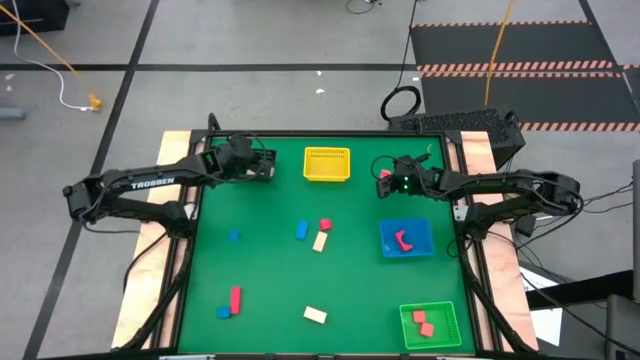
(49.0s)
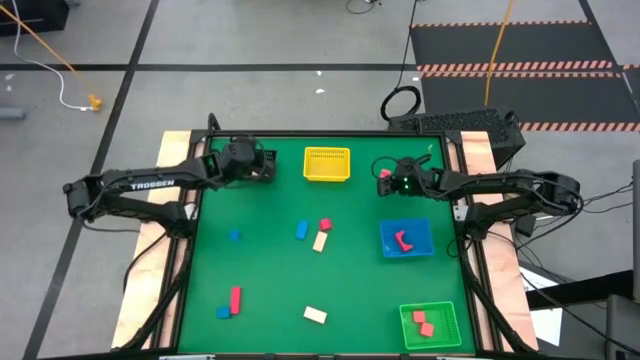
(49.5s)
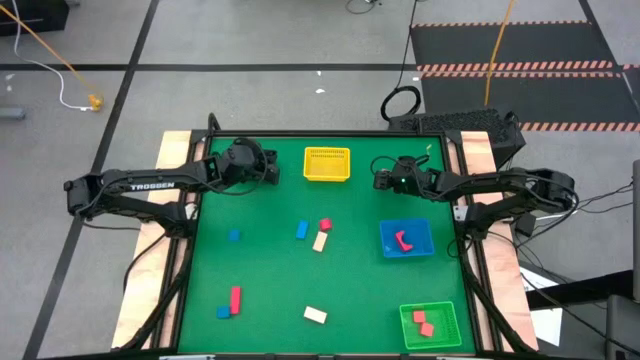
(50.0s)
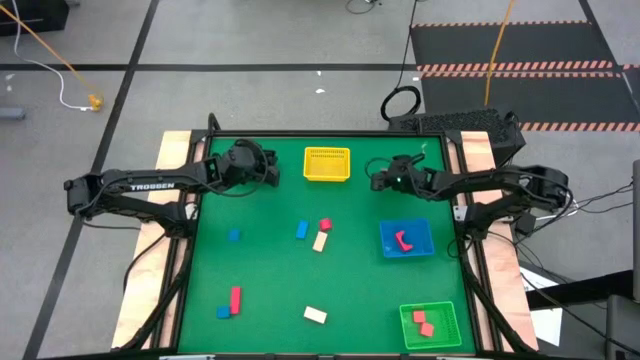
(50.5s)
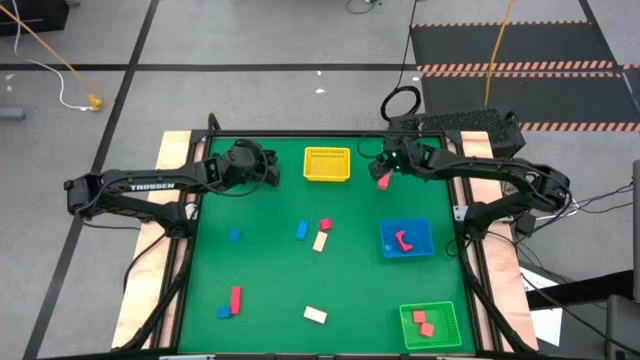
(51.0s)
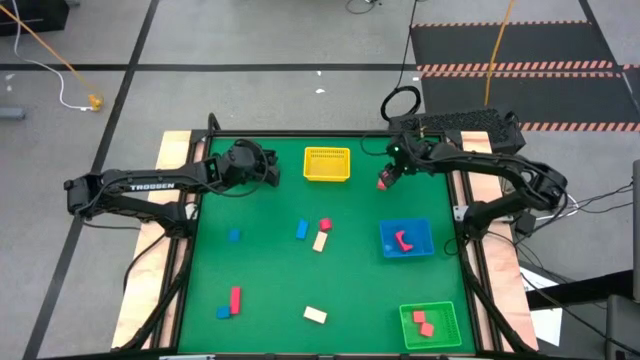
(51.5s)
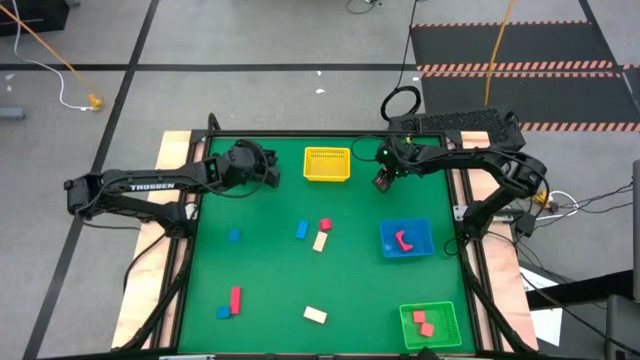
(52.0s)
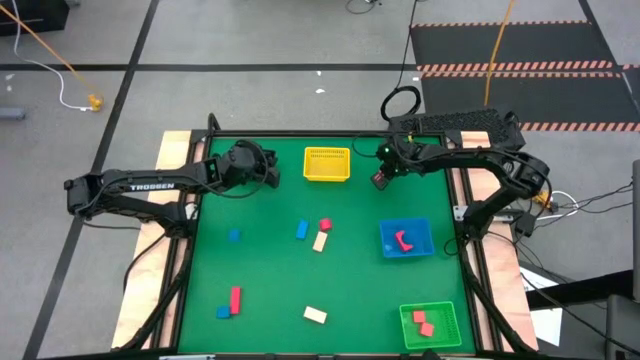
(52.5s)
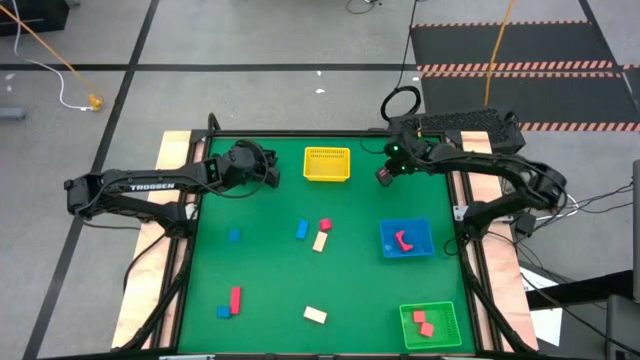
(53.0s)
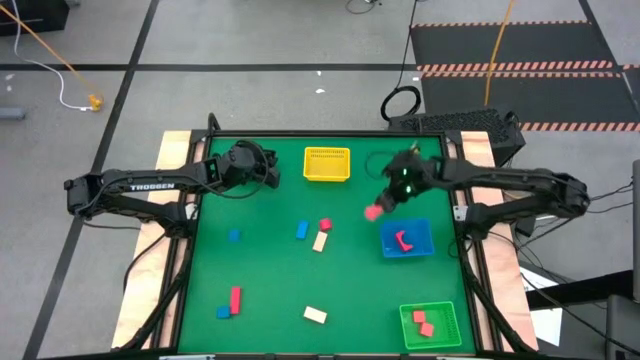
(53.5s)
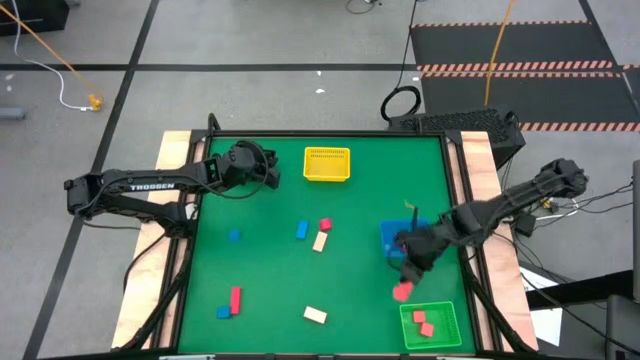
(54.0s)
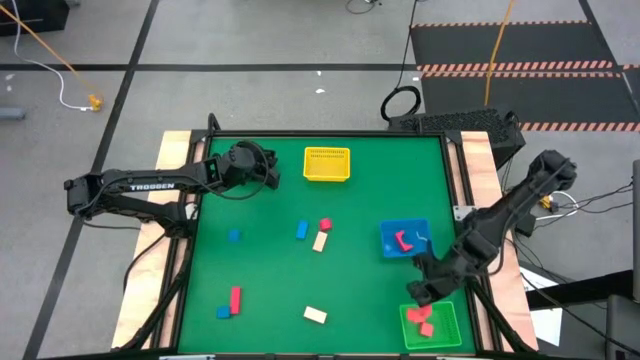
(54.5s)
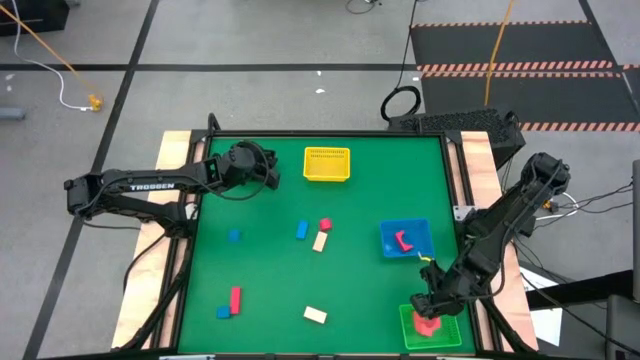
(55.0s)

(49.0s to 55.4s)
Task: Sort & place blocks by color
Put the orange block into the green bin

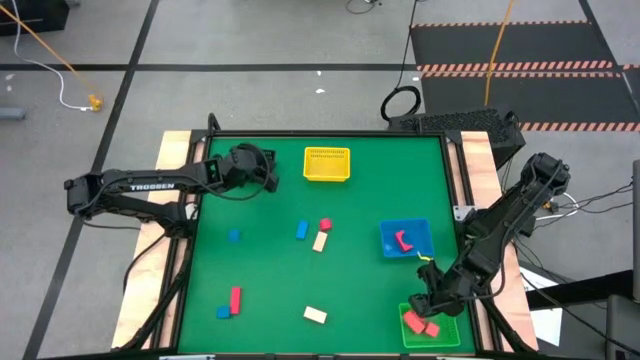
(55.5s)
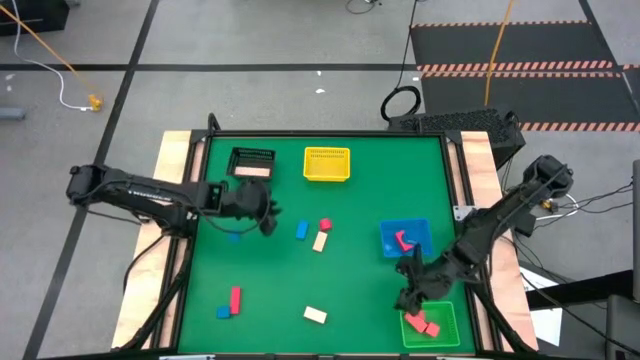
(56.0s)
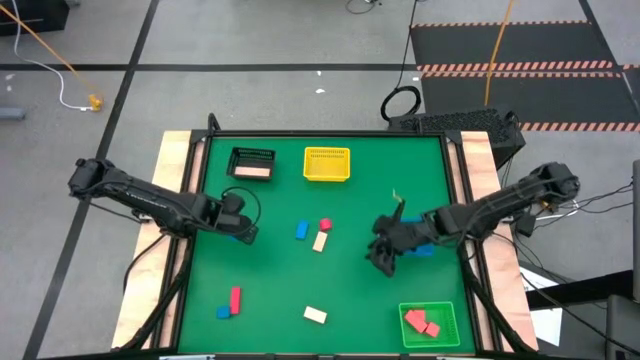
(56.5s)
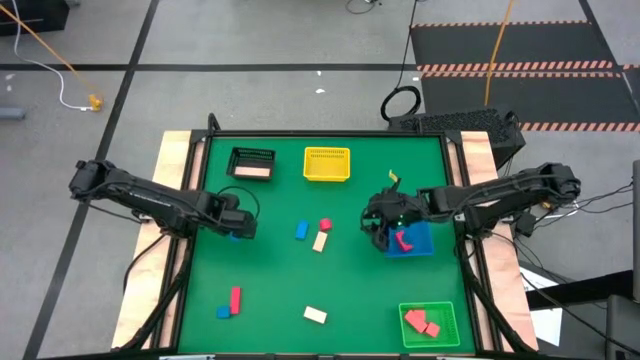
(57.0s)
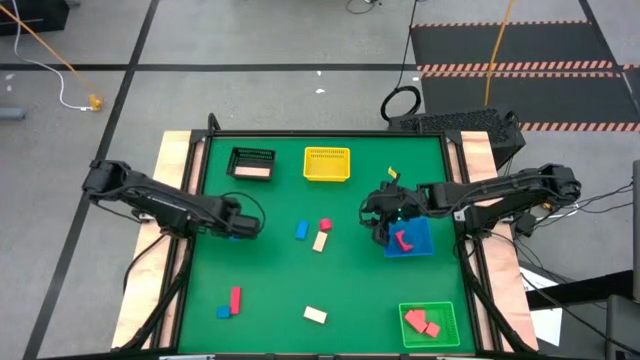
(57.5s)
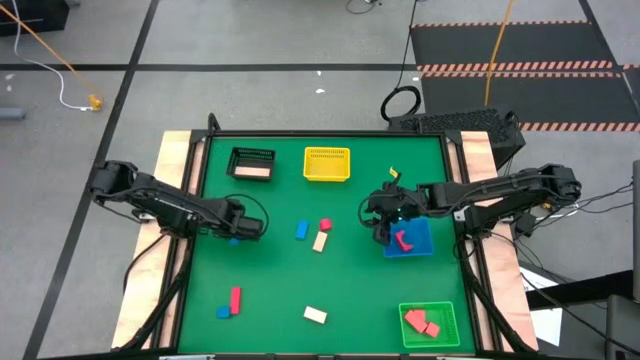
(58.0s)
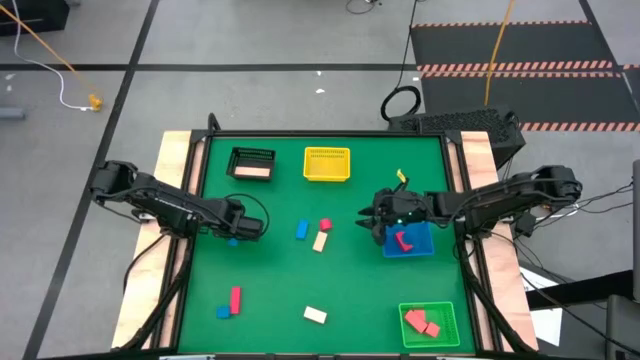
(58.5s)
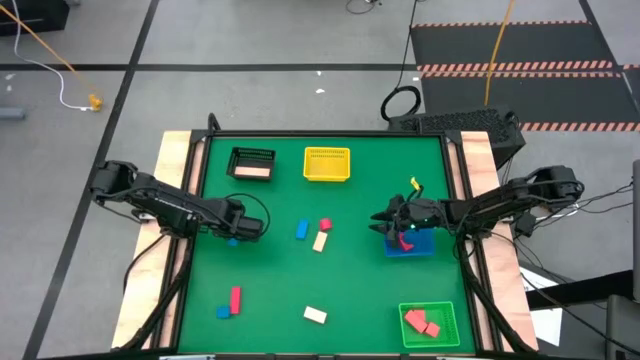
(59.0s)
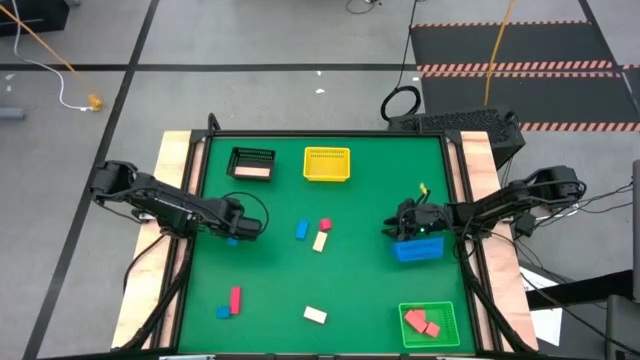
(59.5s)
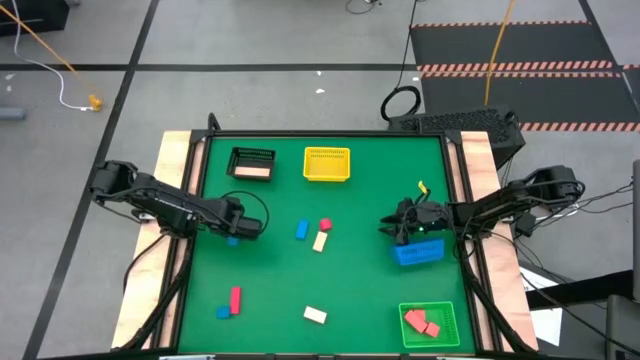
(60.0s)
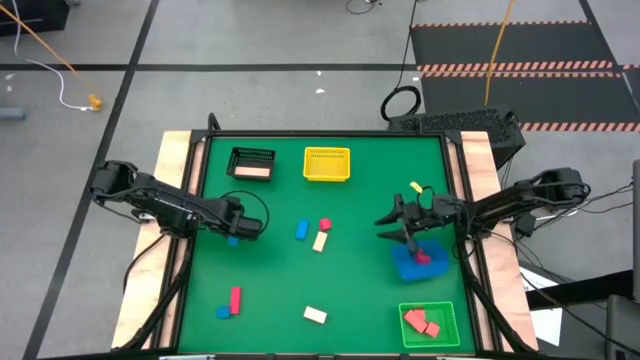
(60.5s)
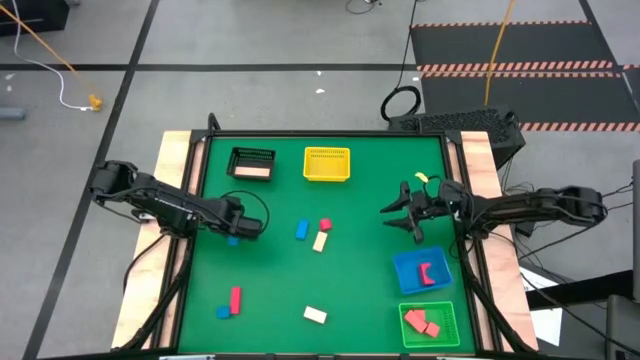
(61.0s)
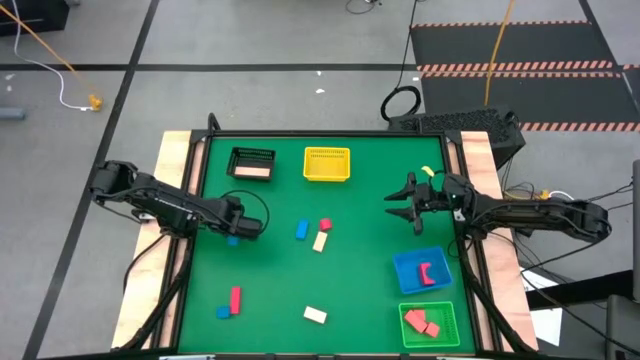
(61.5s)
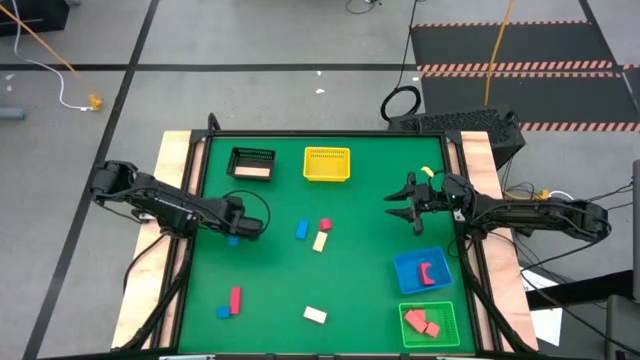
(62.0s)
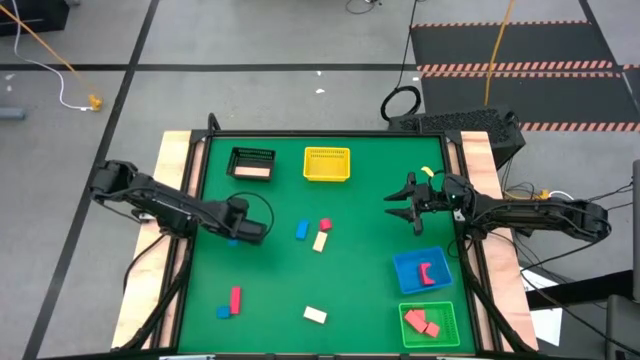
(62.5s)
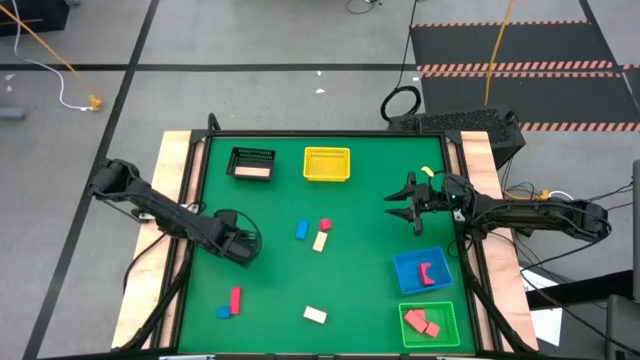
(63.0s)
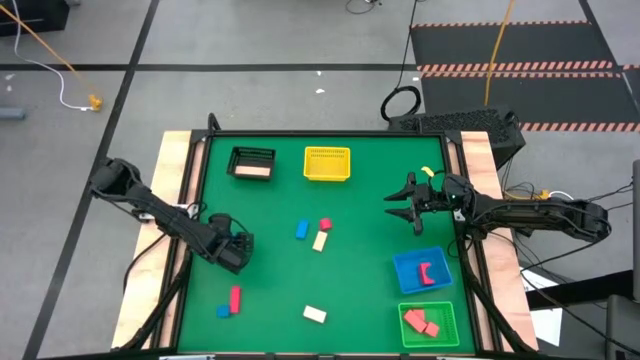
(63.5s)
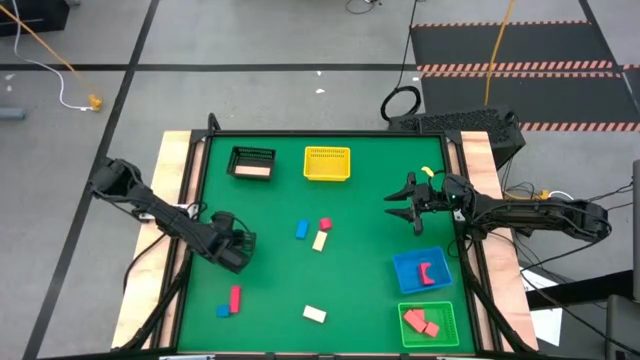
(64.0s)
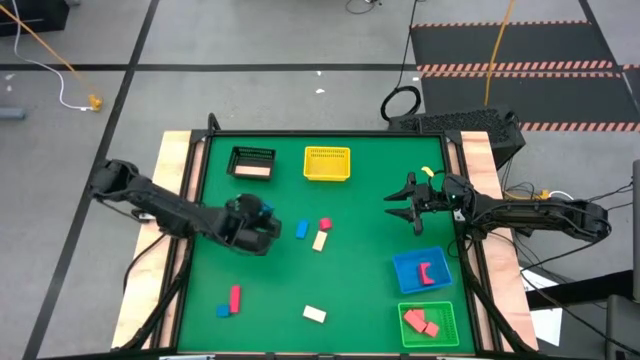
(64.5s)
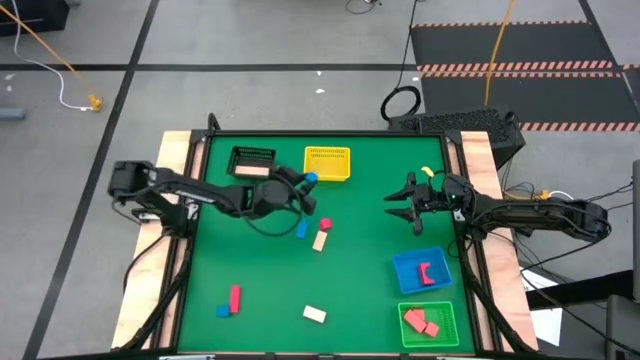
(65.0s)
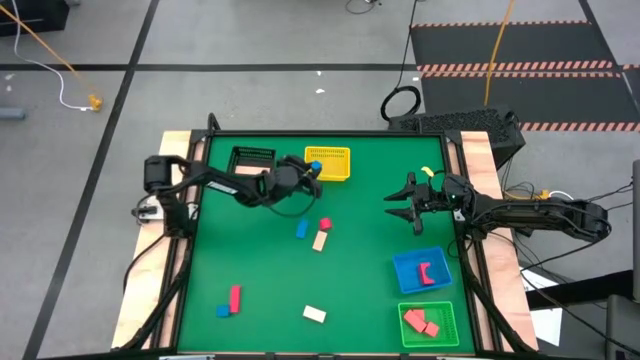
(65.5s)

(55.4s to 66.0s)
Put the top left blue block into the yellow bin

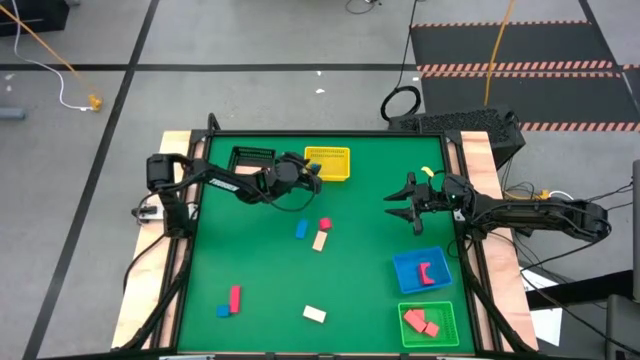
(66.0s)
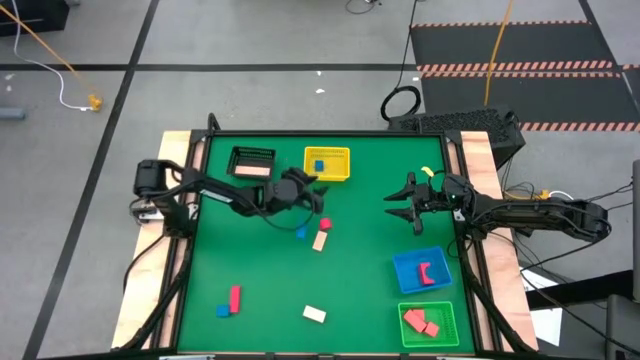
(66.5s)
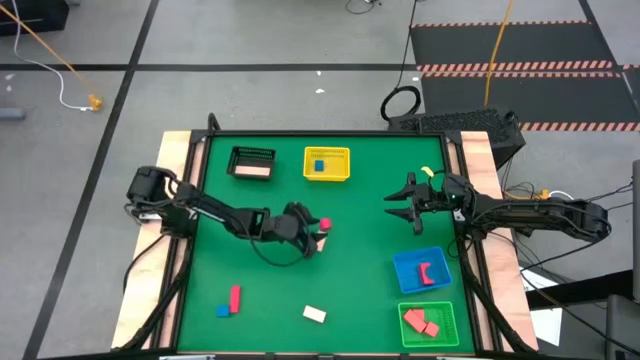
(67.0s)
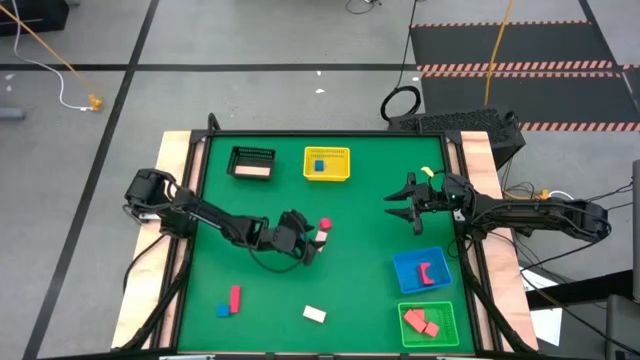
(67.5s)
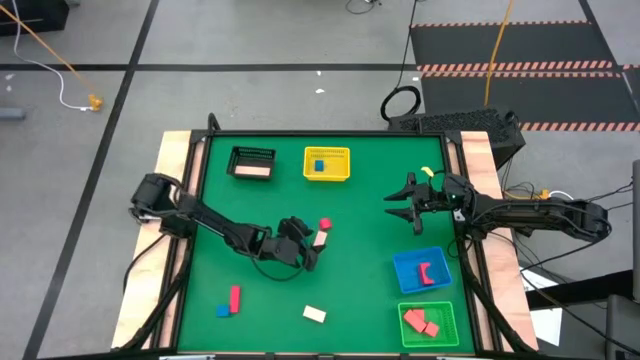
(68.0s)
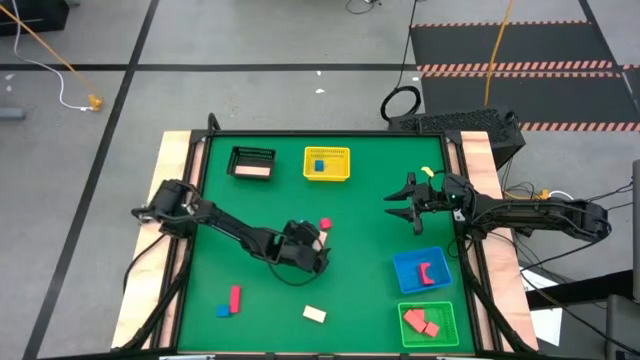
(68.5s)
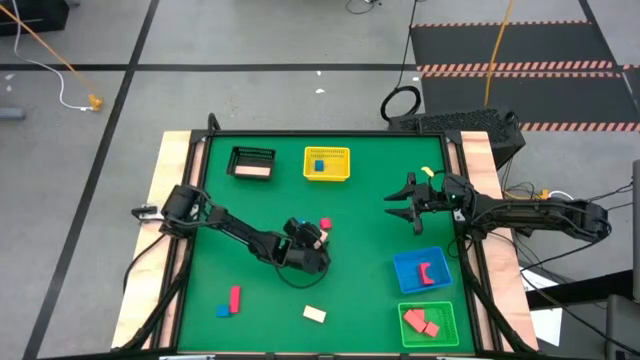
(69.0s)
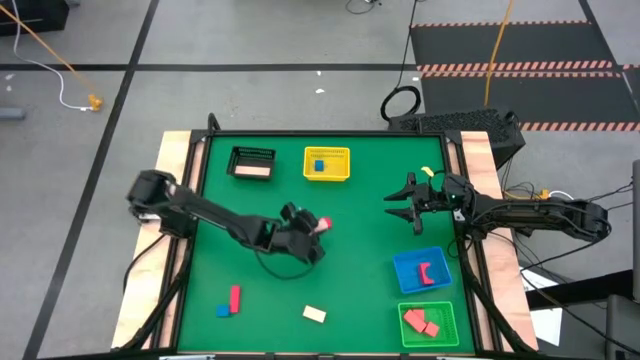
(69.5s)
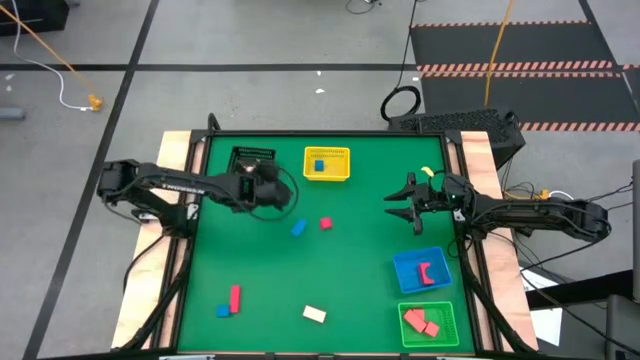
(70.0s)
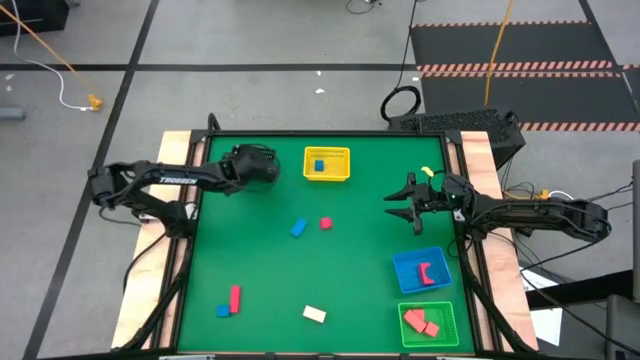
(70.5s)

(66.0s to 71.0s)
Put the top brown block into the black bin
